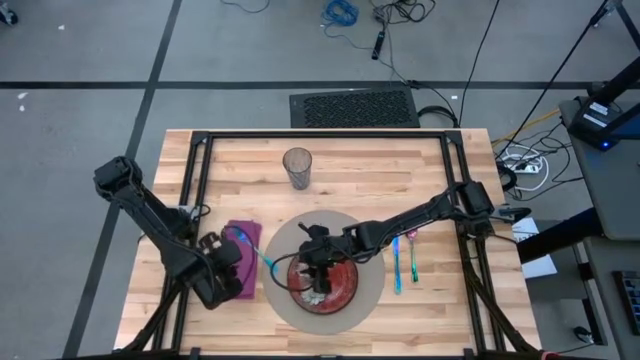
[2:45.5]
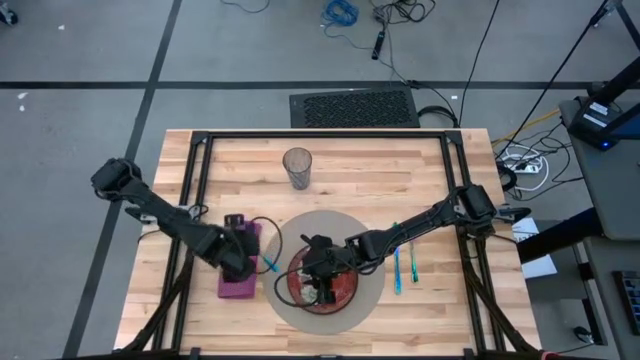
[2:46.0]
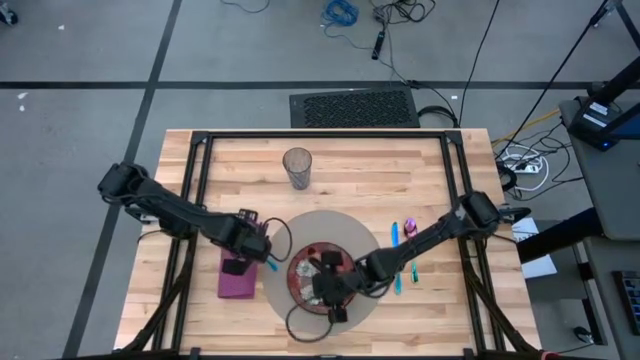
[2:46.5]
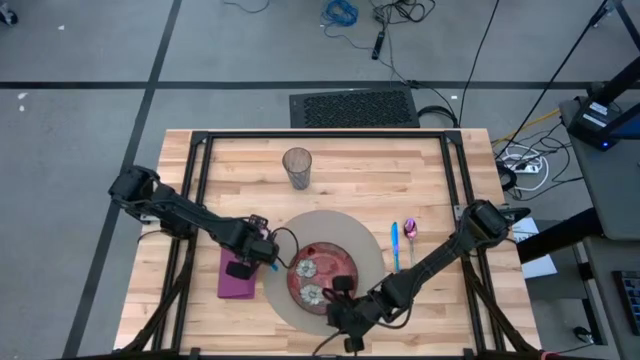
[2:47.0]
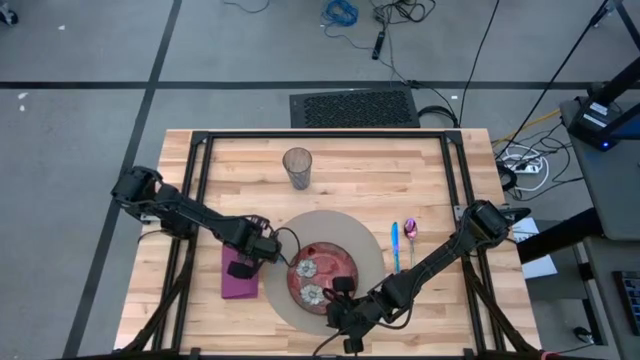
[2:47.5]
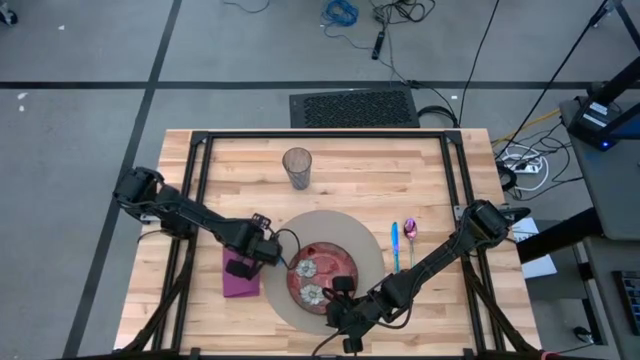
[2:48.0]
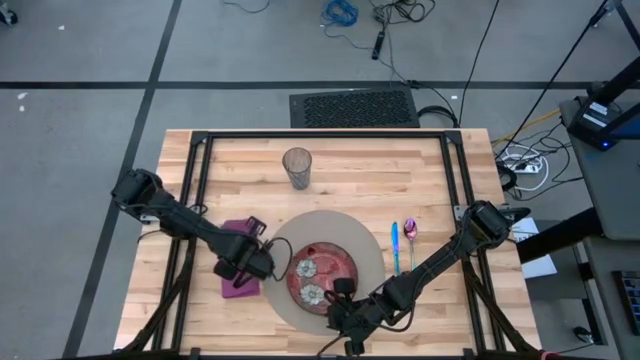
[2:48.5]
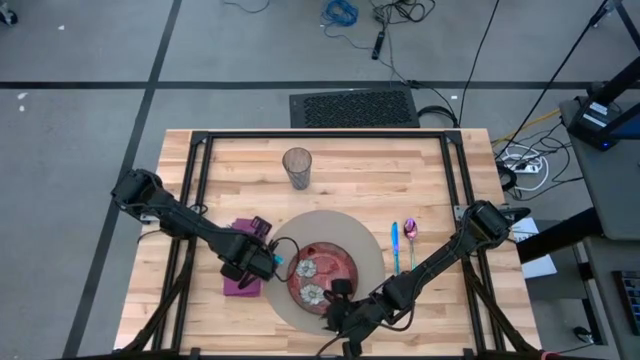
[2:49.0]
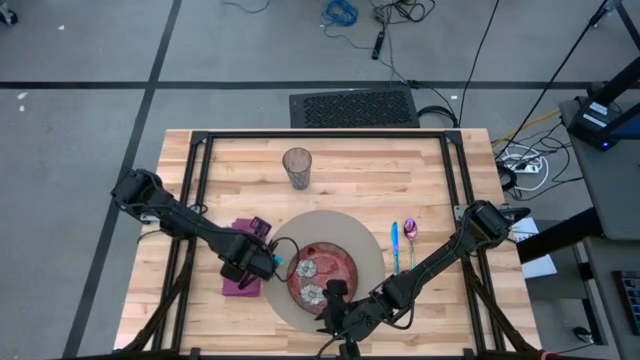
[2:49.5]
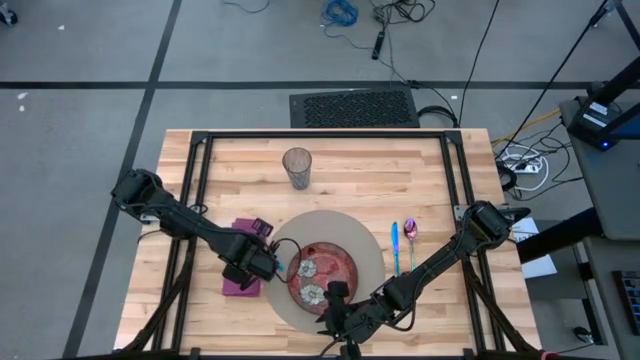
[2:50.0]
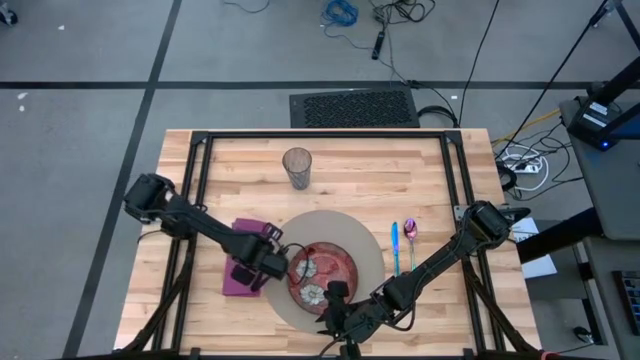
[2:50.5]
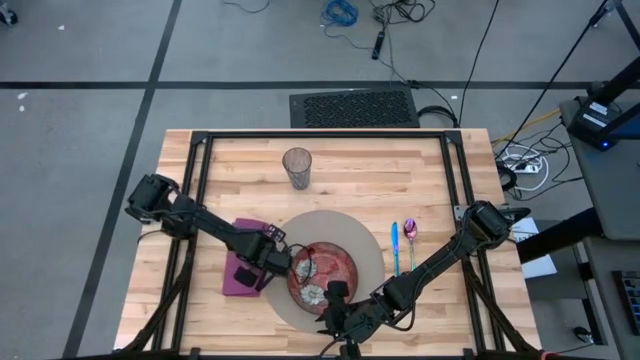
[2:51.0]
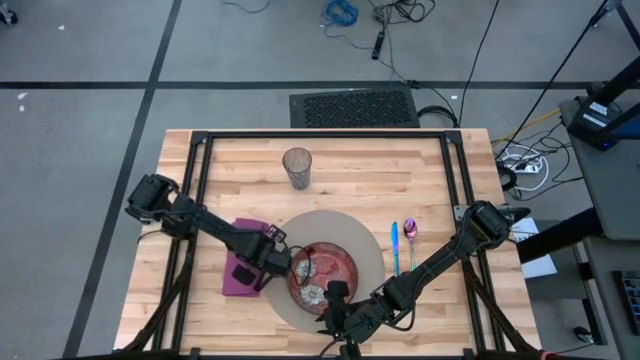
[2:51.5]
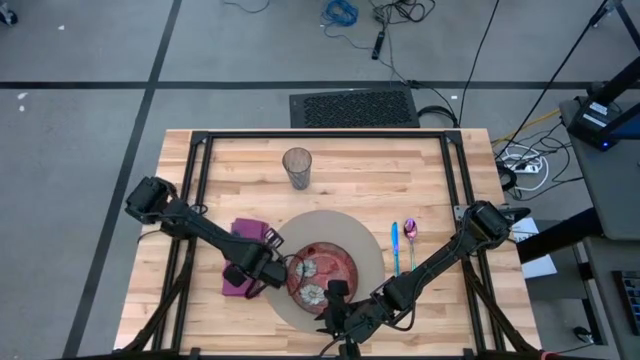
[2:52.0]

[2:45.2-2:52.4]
Task: Set table place
Adjust the blue fork

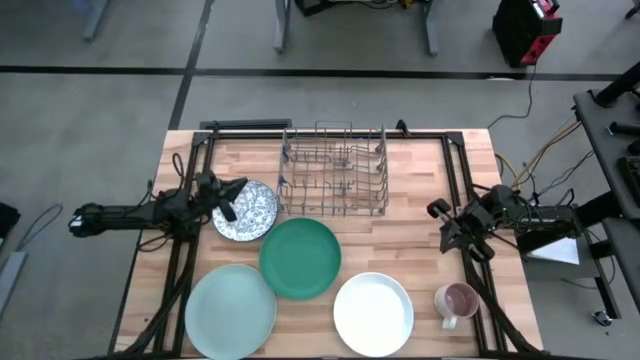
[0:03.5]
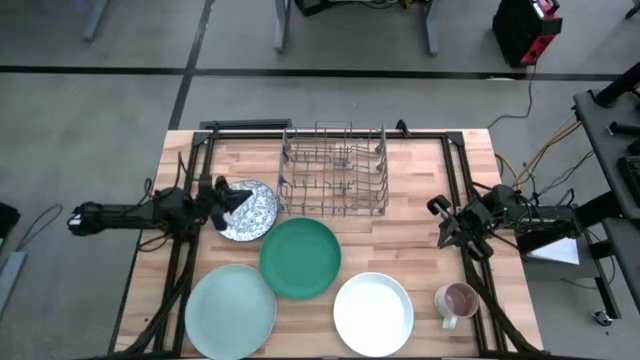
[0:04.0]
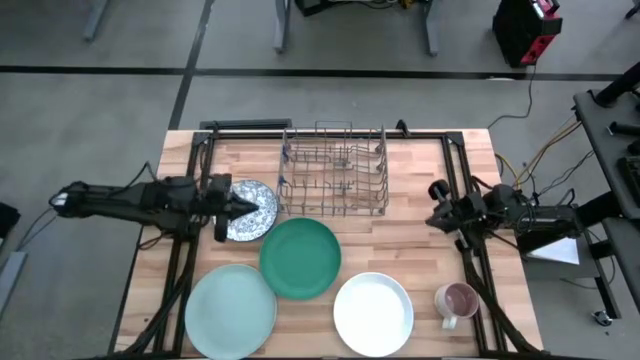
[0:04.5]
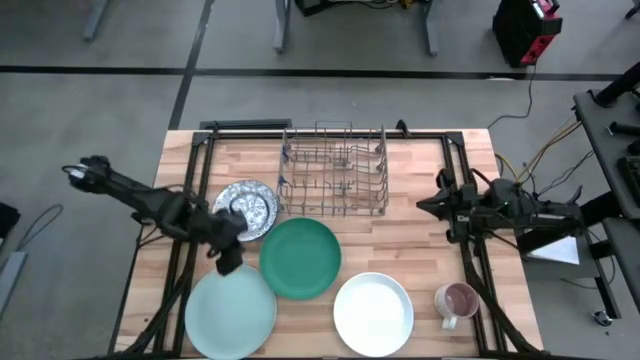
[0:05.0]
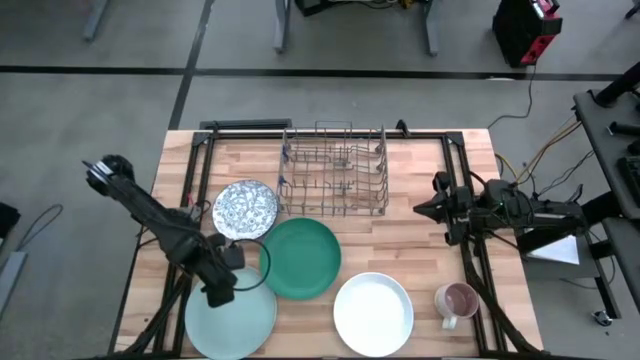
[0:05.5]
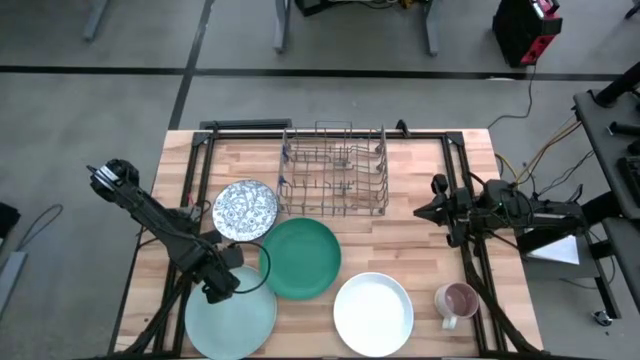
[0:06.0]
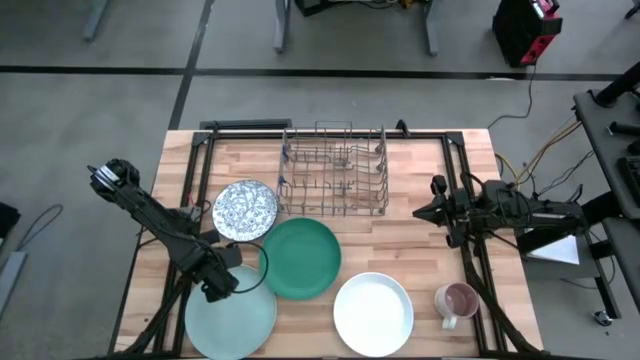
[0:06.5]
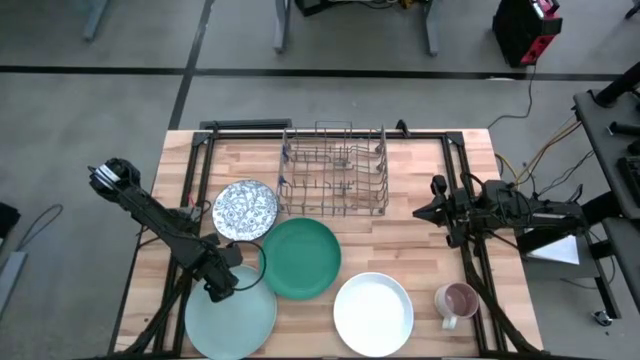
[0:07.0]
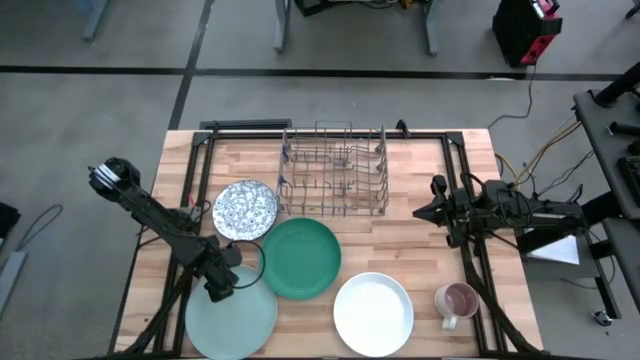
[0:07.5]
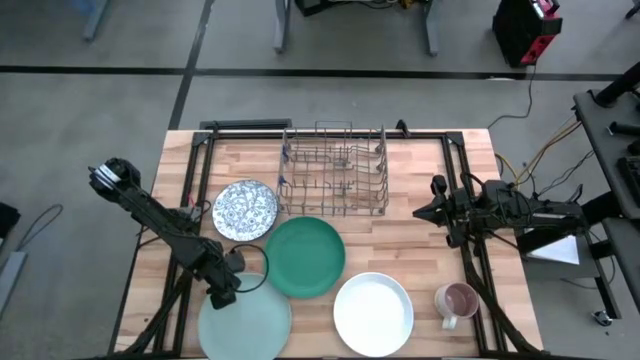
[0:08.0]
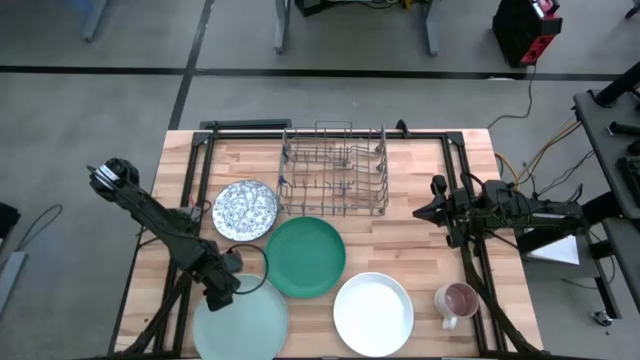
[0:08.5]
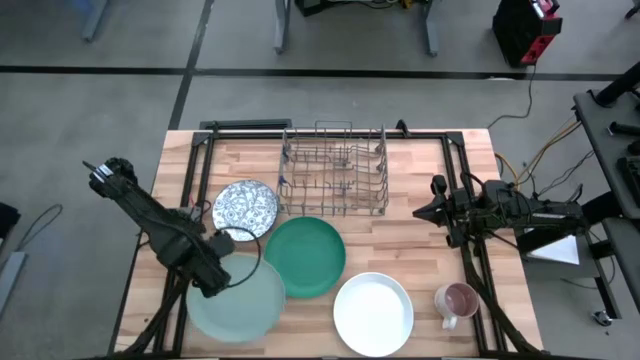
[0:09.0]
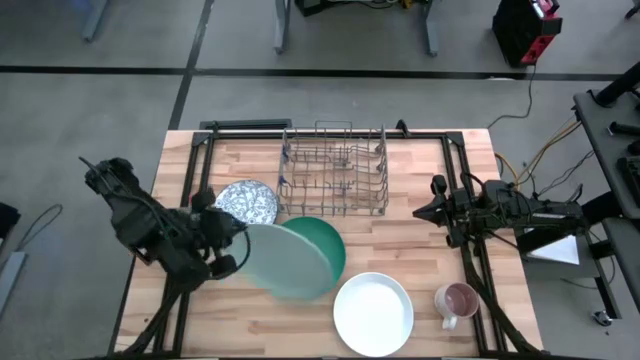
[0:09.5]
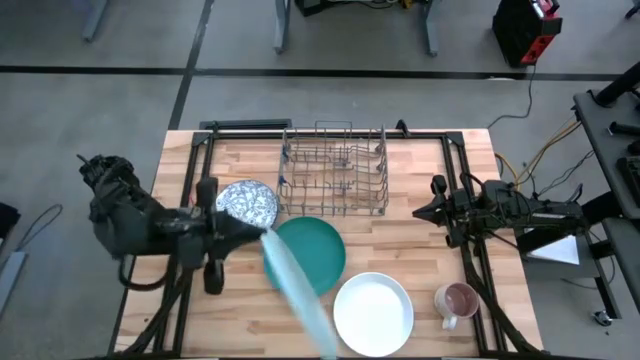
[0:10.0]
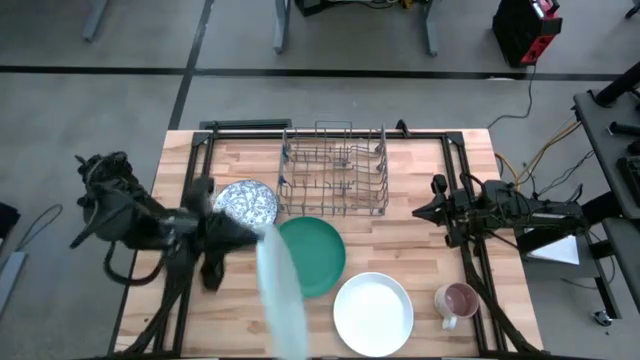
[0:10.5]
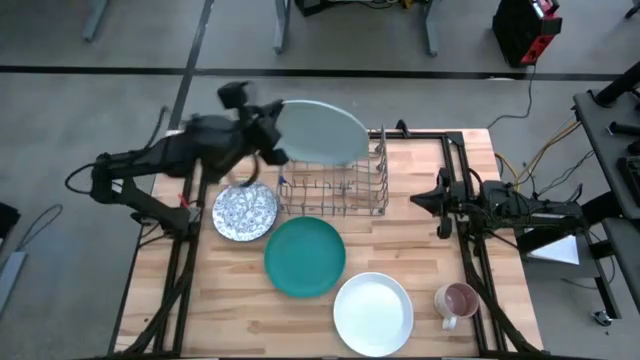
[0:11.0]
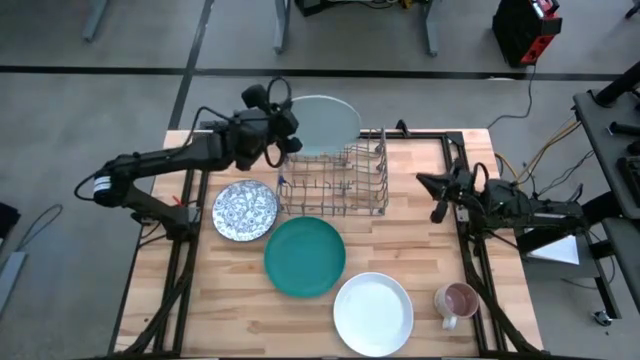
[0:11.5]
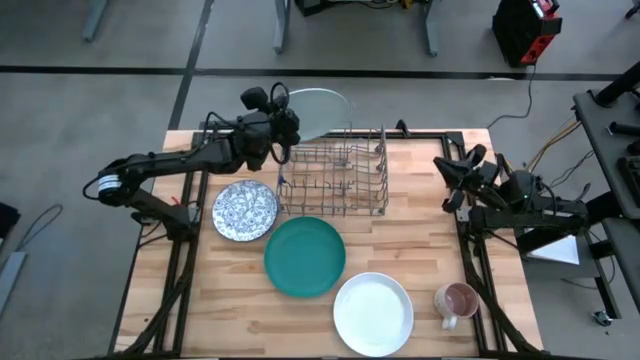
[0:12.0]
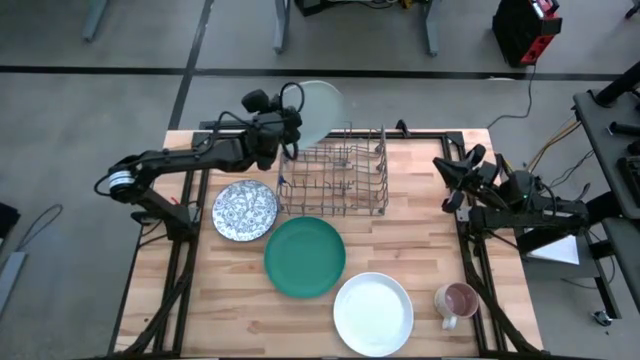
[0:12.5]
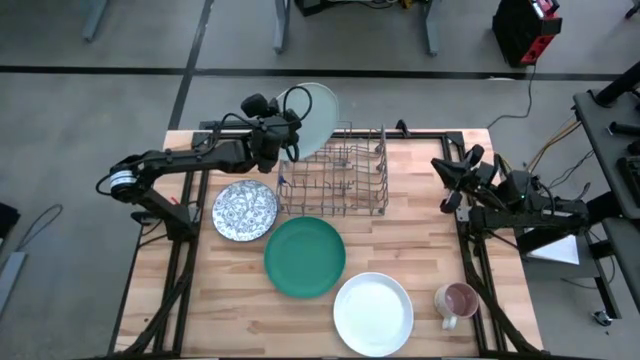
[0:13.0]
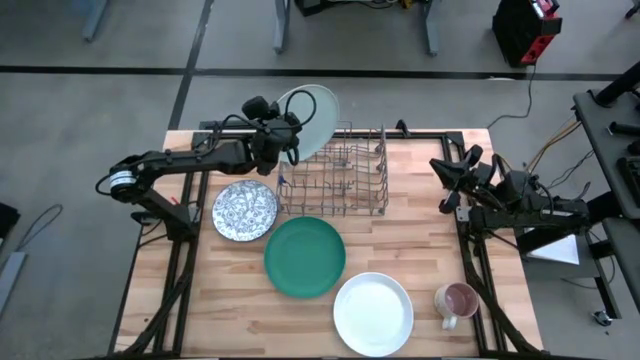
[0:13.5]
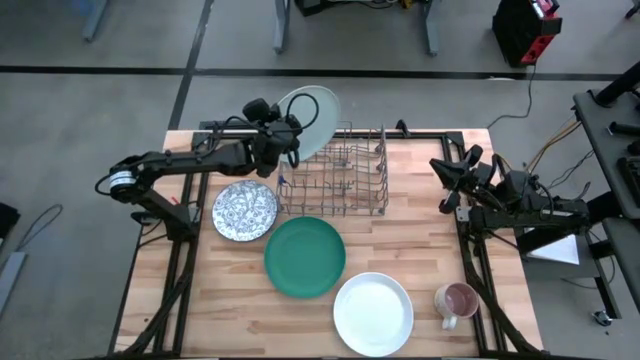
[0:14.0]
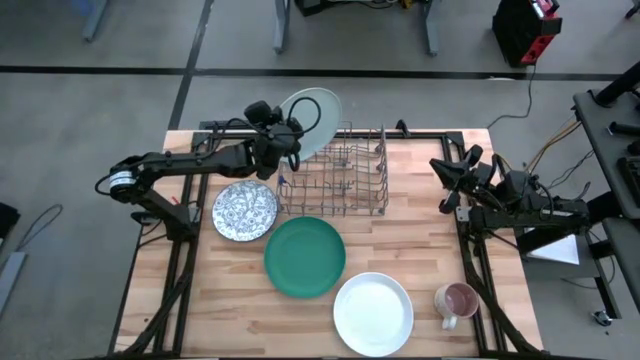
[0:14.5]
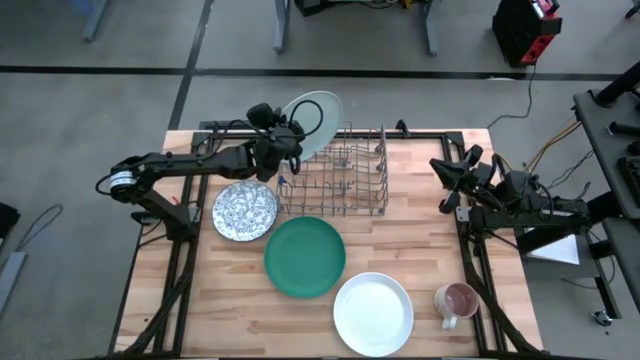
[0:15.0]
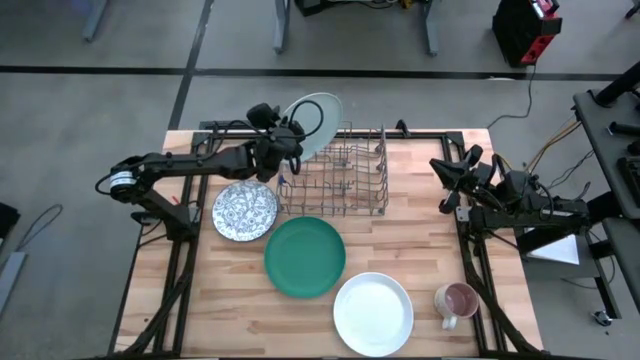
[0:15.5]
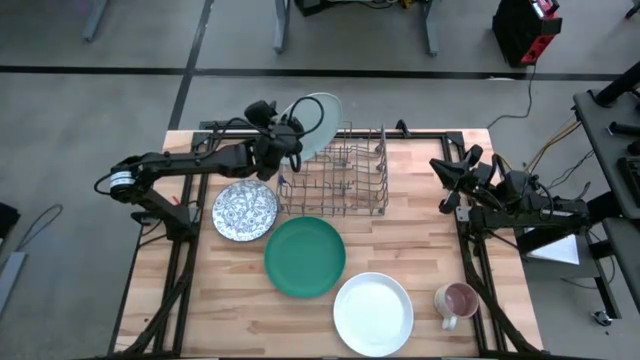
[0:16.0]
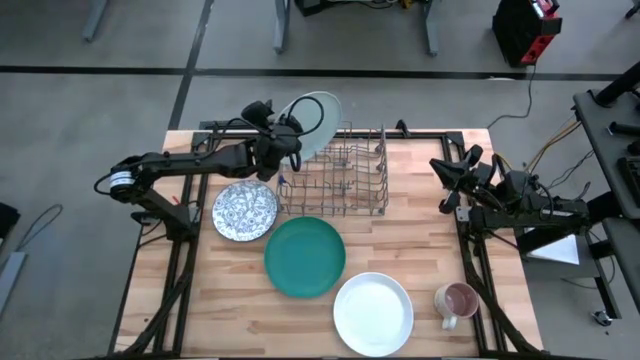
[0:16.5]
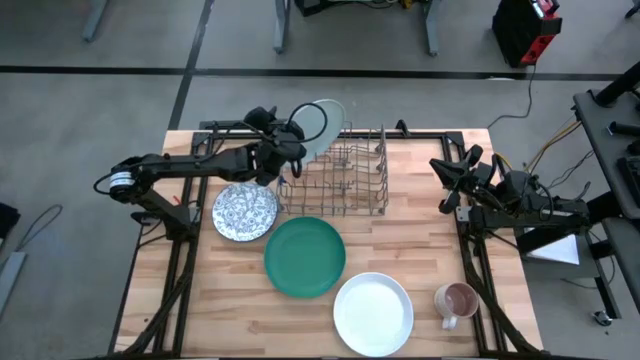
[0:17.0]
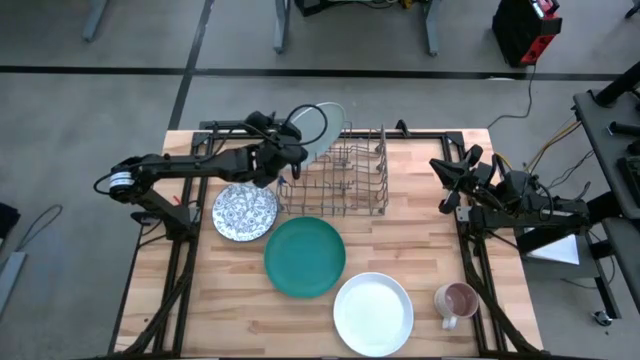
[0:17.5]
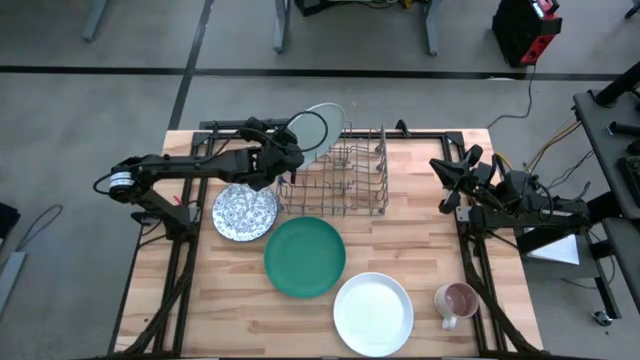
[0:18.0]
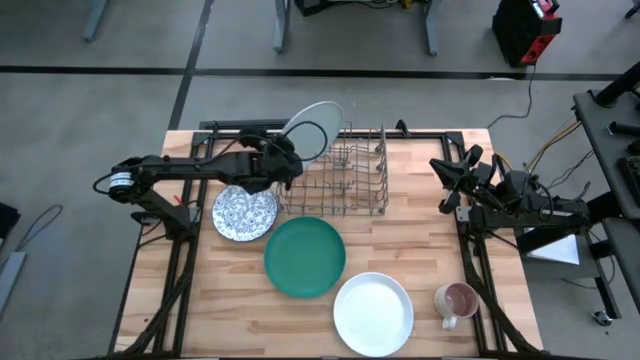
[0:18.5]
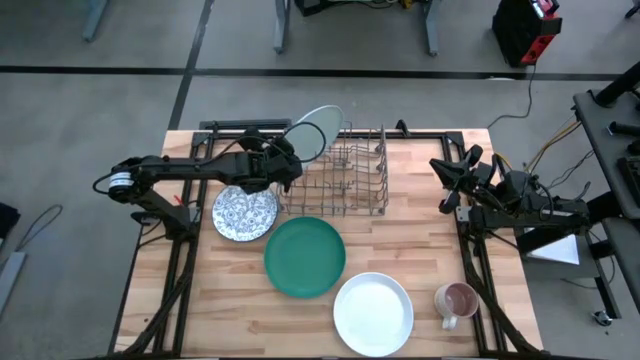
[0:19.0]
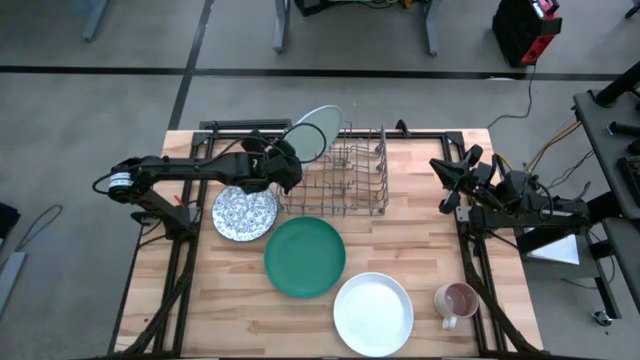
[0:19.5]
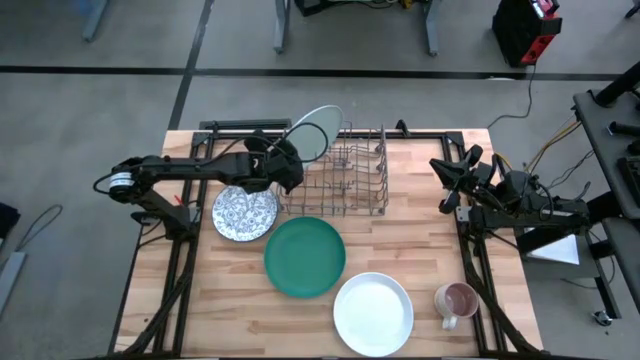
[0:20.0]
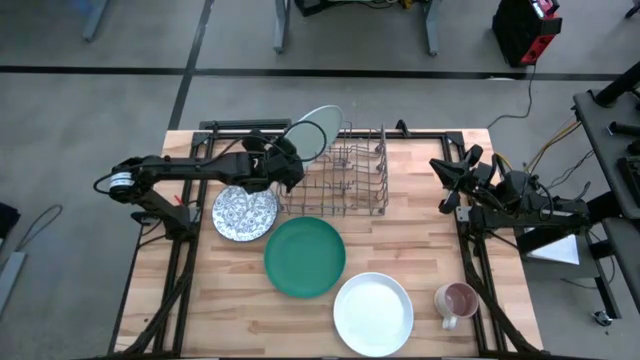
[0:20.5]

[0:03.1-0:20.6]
Task: Sort dishes
Put the light blue plate into the dish rack
